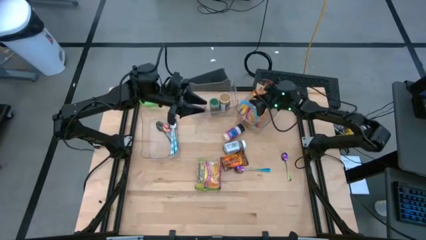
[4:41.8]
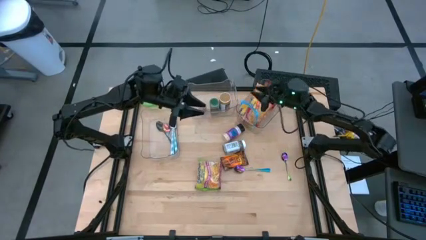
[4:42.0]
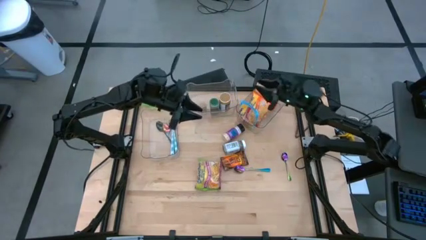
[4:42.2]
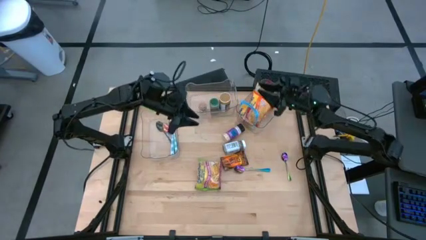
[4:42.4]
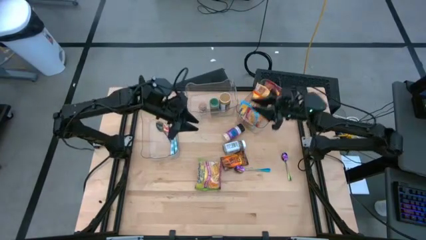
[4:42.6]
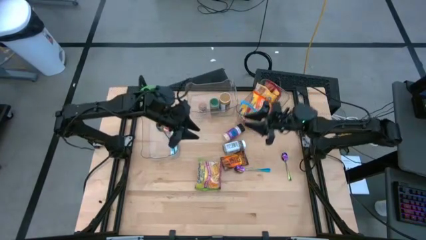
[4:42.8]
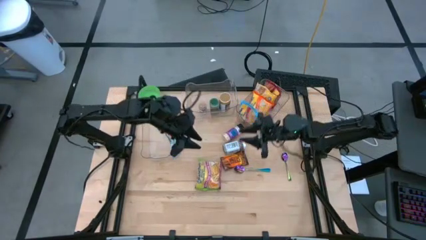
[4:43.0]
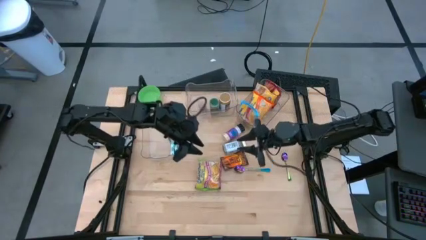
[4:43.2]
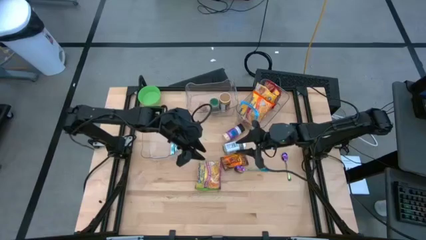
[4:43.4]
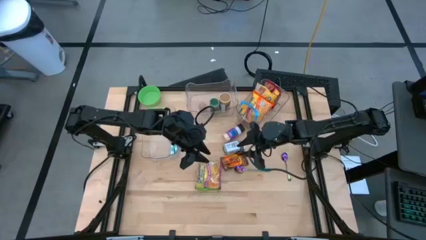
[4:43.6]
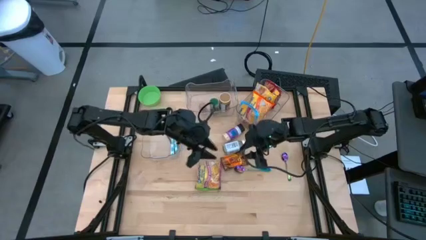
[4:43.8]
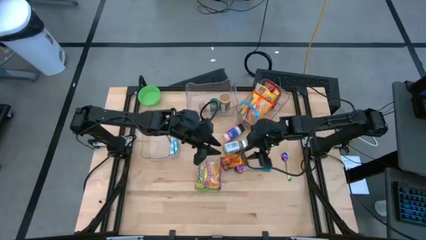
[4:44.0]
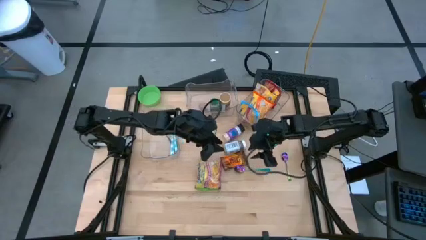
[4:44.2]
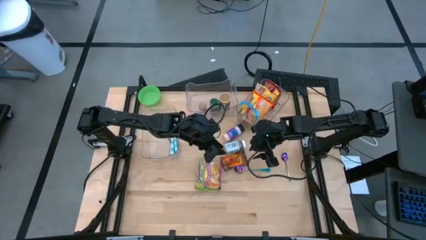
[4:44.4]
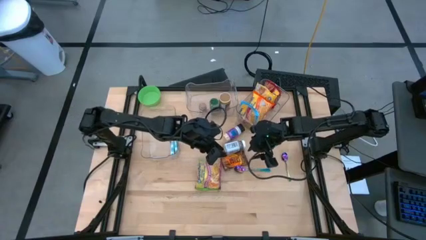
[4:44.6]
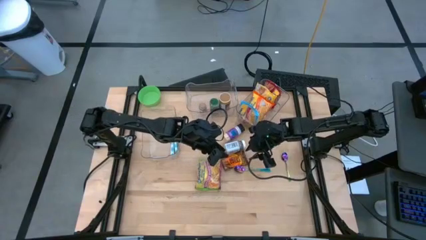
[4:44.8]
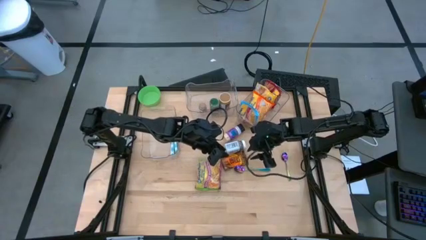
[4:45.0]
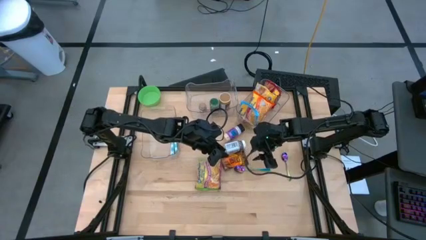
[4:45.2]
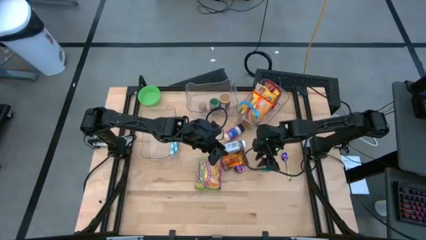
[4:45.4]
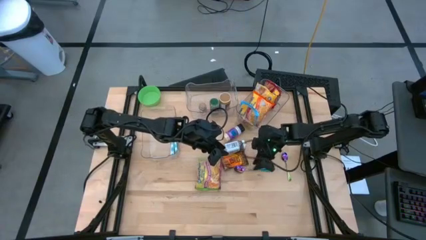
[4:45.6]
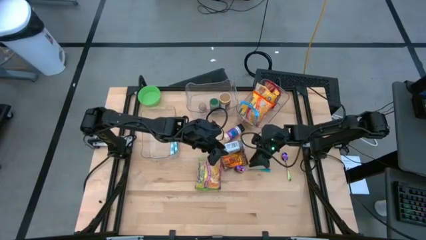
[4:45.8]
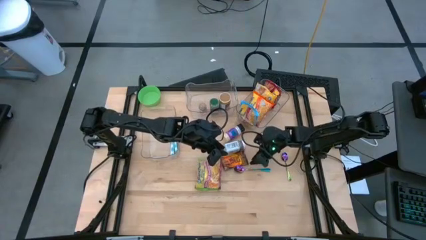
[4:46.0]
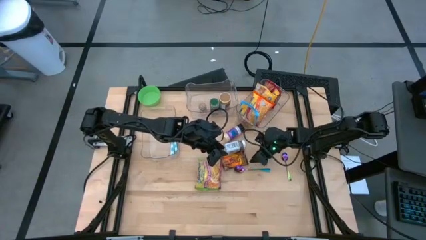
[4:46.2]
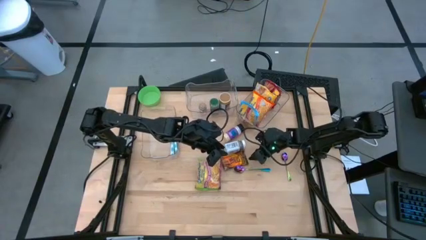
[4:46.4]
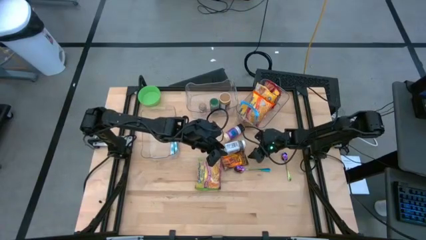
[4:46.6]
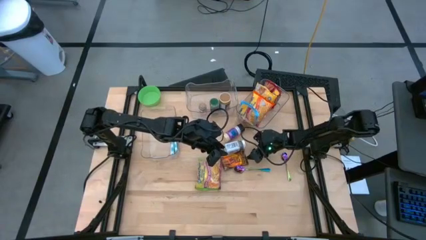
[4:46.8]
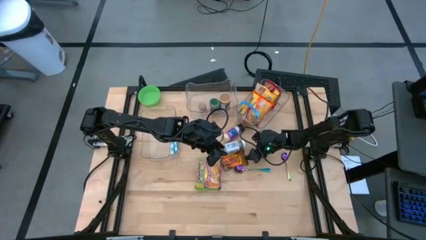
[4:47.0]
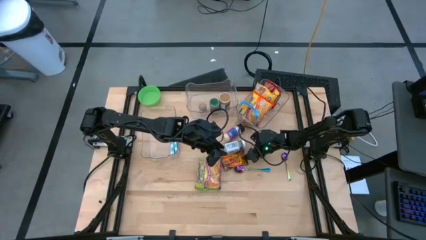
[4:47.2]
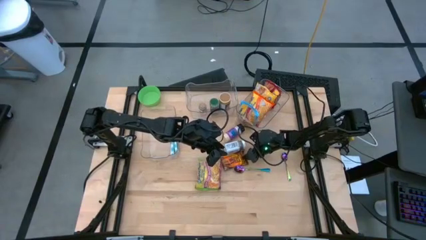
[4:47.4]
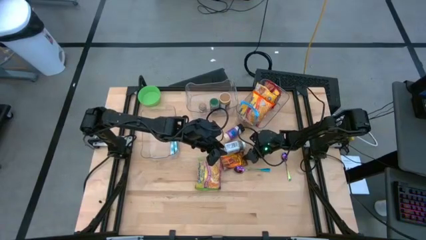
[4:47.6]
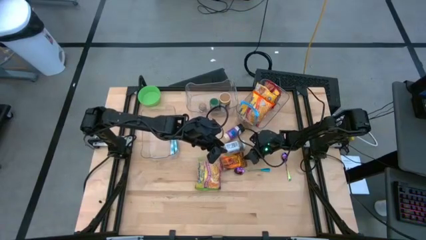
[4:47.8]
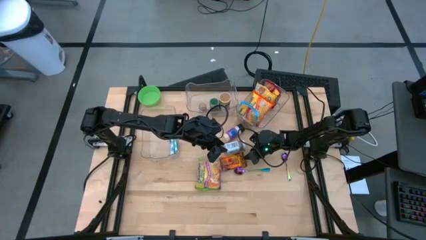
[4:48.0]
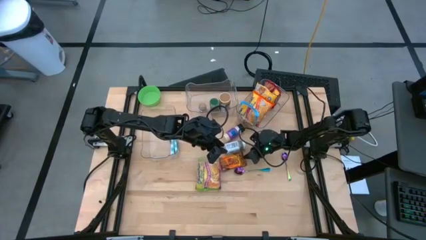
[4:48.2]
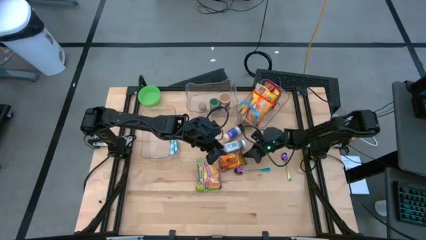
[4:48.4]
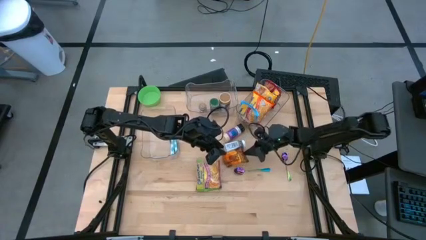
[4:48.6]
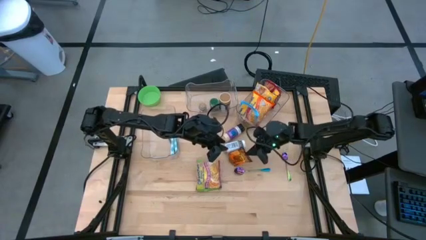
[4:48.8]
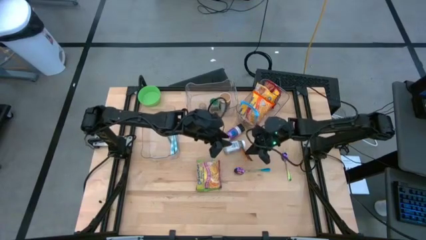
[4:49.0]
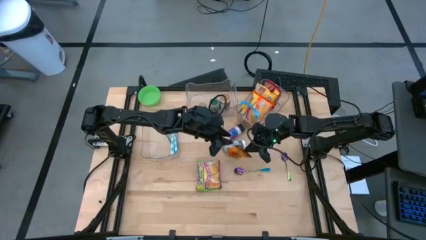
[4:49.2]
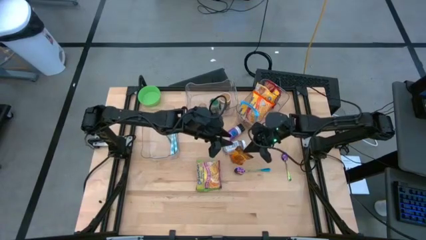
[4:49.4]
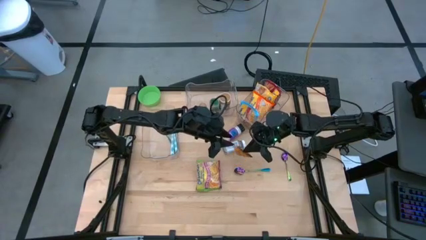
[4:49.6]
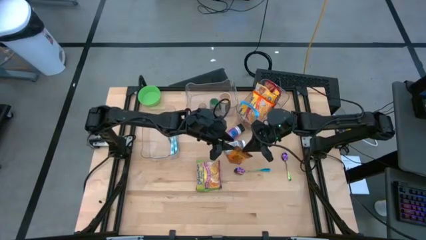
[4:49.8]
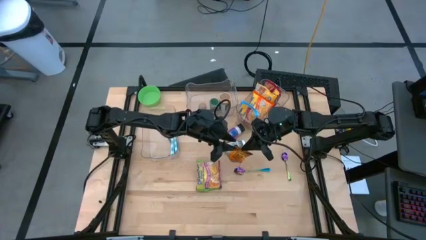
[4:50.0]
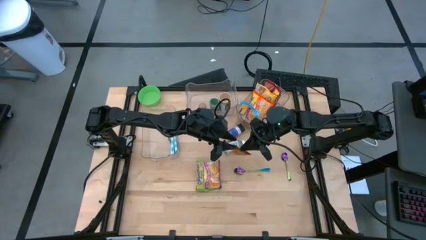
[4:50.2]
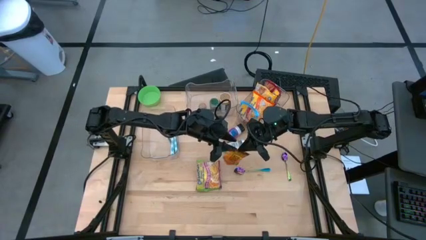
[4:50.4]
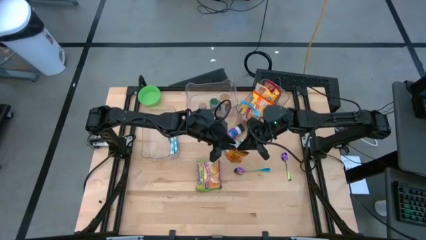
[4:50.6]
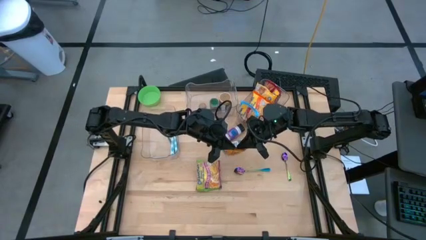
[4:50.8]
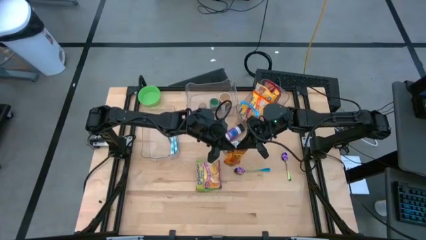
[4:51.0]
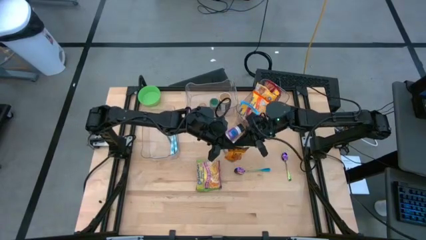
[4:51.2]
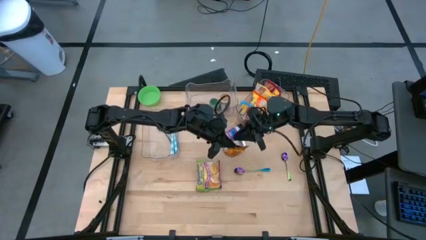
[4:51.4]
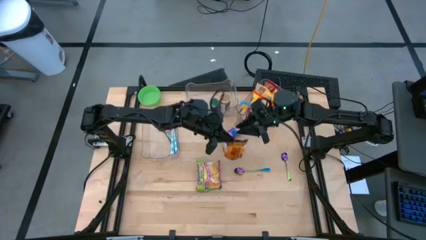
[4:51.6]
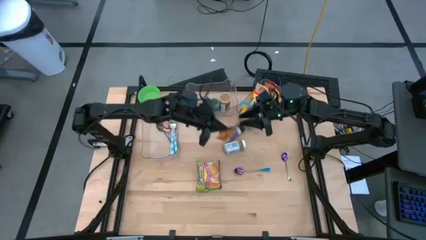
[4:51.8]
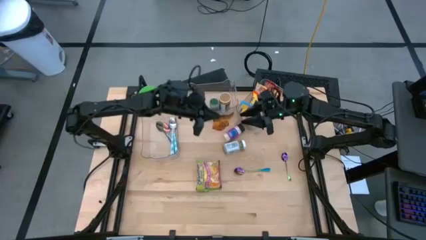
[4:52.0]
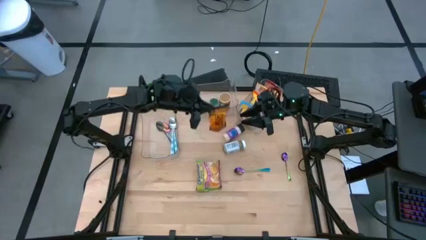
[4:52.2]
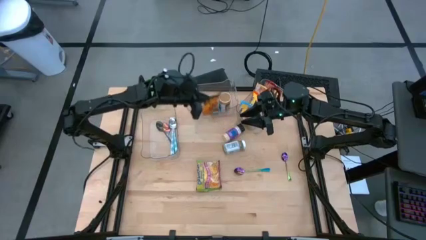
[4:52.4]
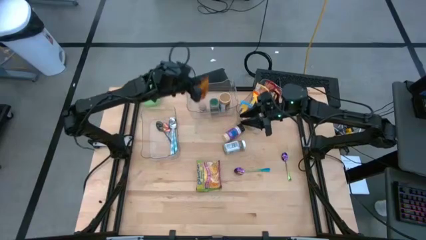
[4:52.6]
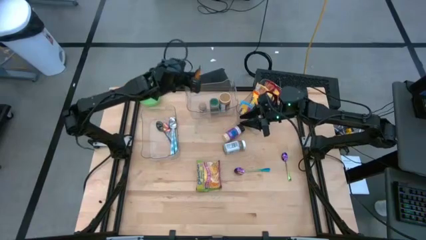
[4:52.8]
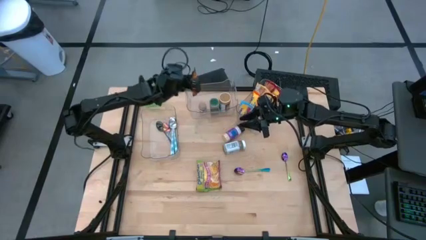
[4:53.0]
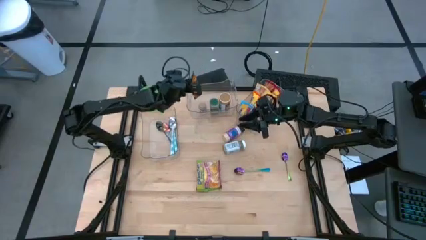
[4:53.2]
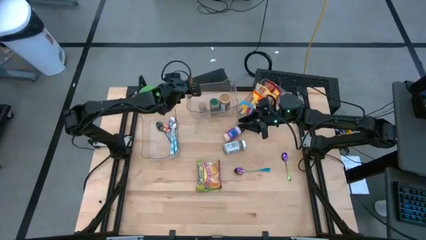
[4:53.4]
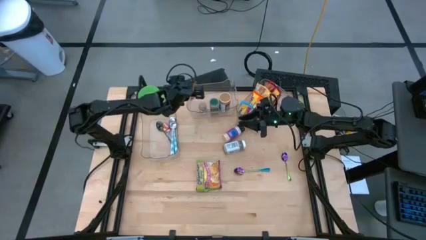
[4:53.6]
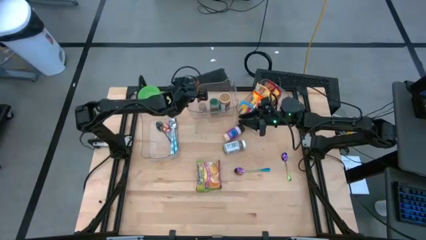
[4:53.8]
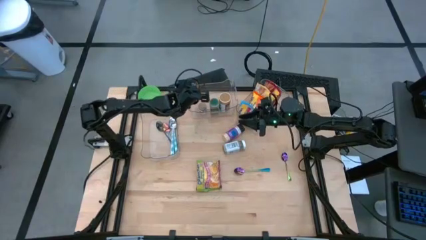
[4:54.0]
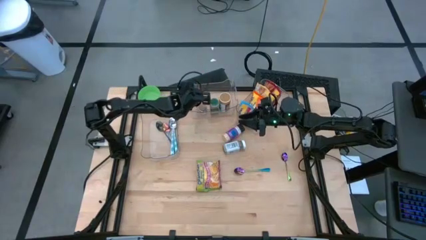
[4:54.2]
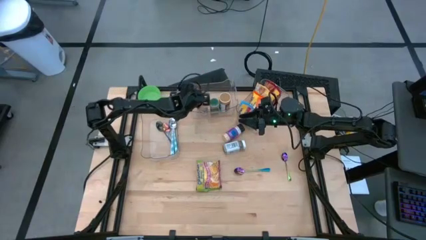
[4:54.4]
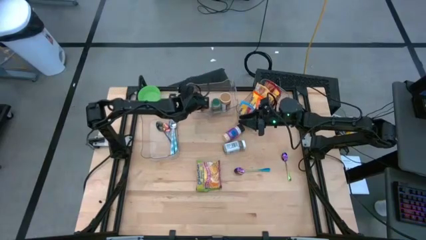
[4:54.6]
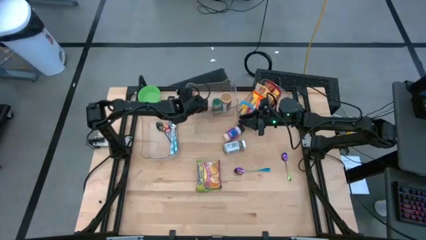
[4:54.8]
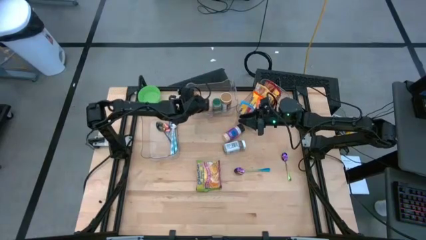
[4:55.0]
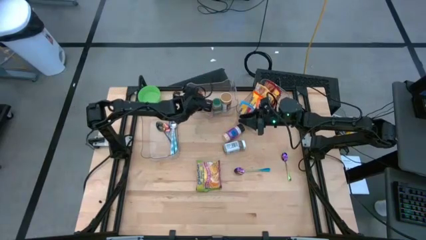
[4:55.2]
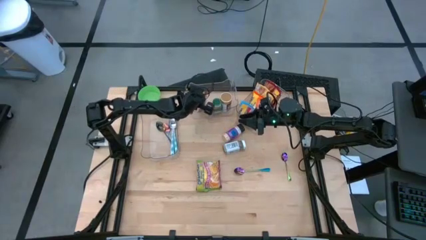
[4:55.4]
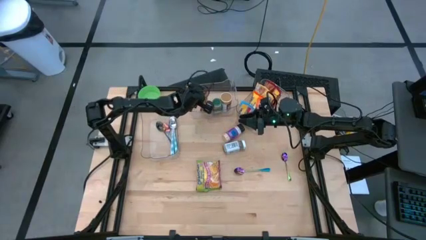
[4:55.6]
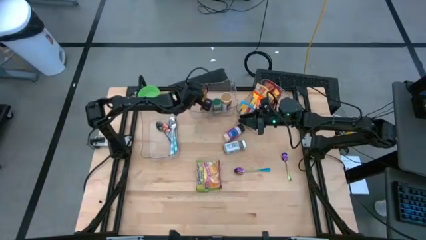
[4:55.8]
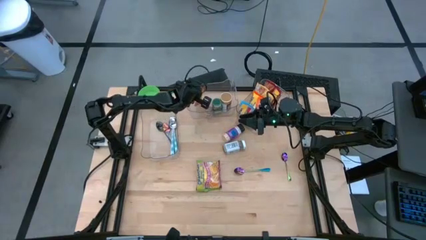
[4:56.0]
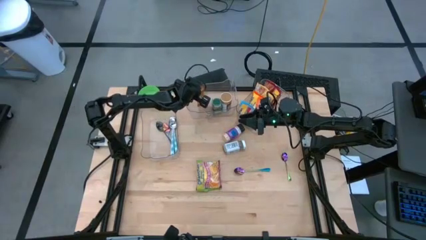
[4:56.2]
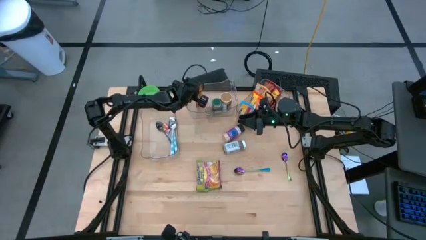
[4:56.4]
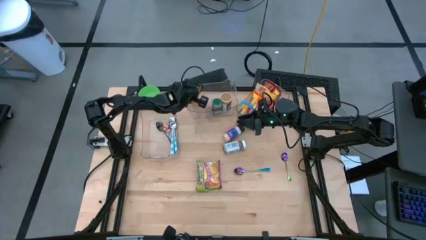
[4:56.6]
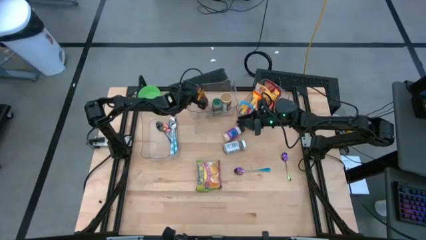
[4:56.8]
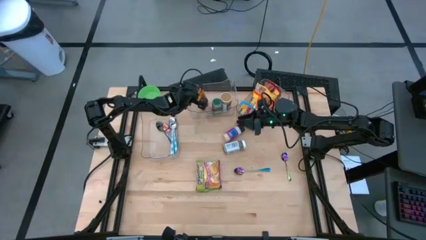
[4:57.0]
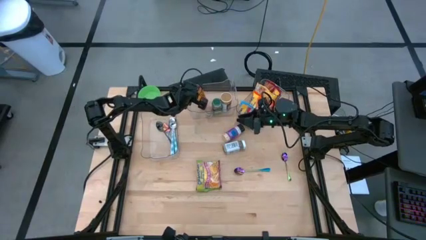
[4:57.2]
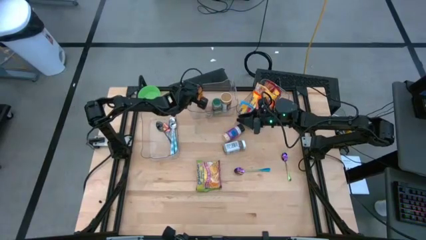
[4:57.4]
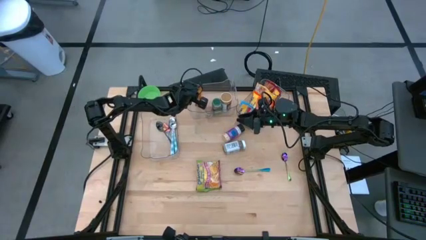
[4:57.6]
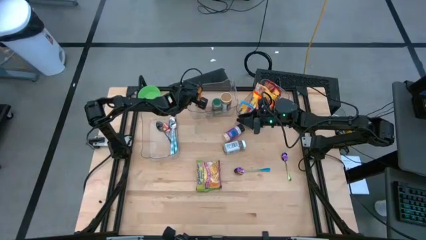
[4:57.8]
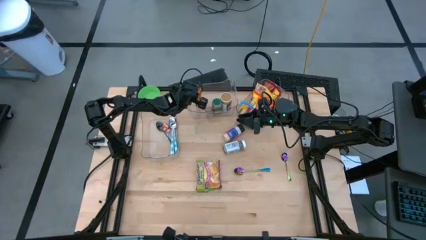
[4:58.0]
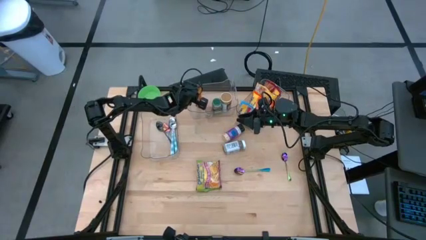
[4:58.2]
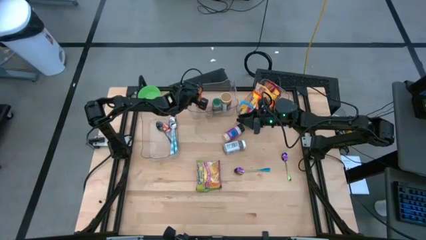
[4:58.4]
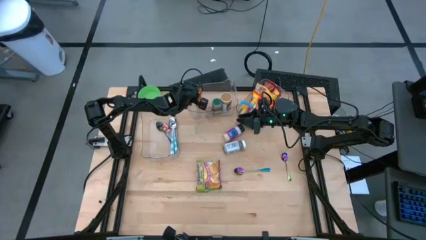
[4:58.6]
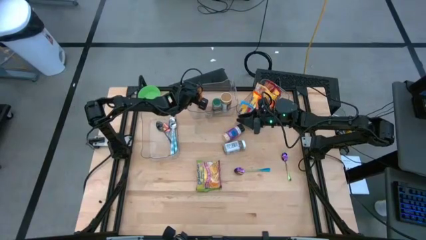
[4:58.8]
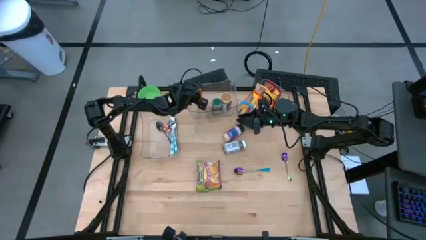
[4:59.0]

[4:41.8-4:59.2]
Task: Pick & Place Food Item
Put the orange spice pack into the middle transparent bin
